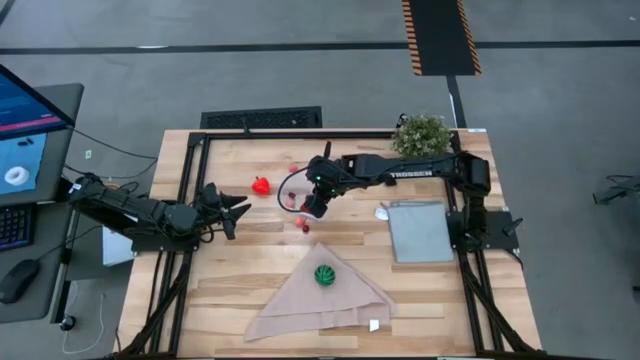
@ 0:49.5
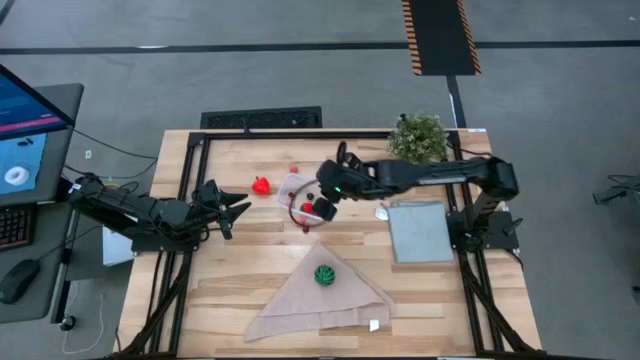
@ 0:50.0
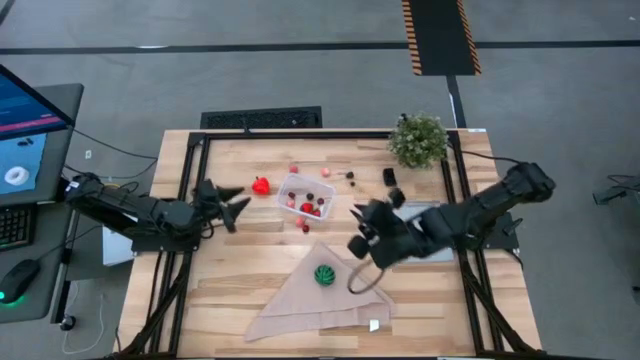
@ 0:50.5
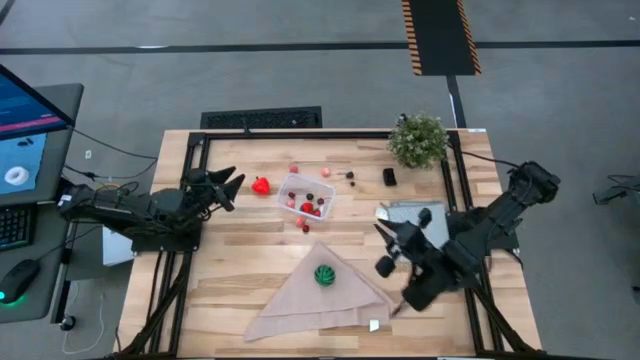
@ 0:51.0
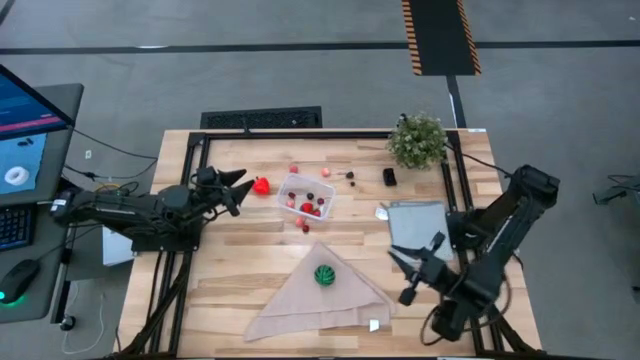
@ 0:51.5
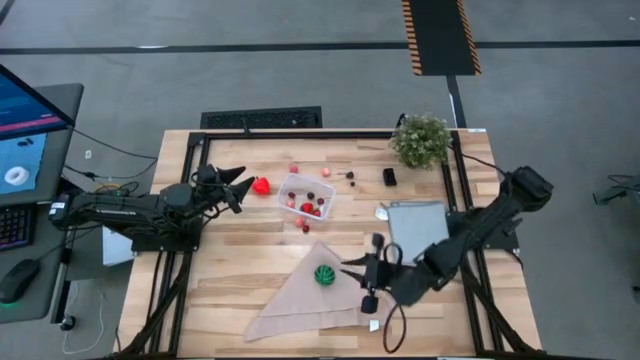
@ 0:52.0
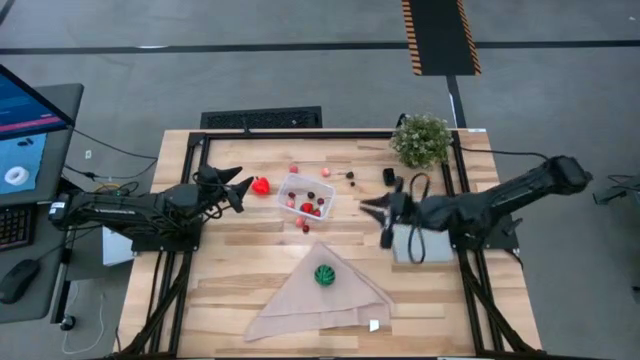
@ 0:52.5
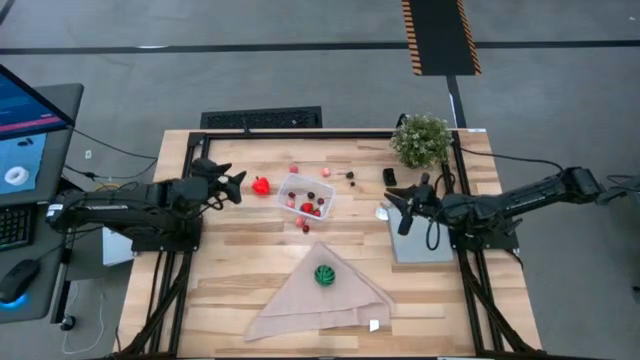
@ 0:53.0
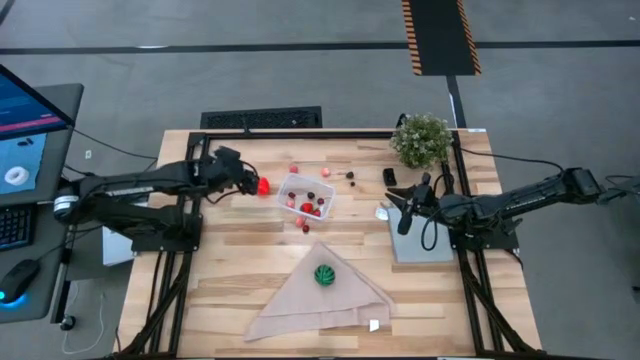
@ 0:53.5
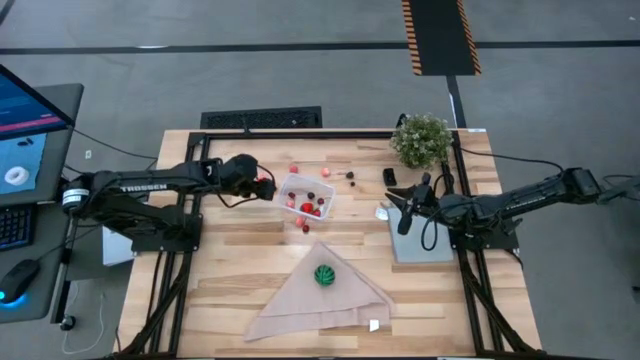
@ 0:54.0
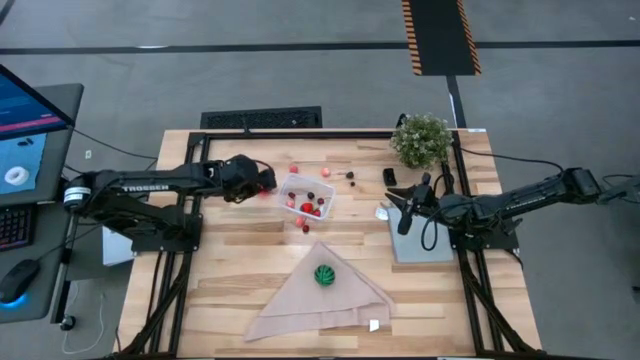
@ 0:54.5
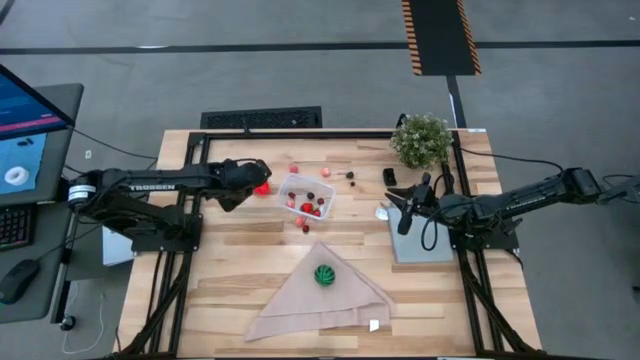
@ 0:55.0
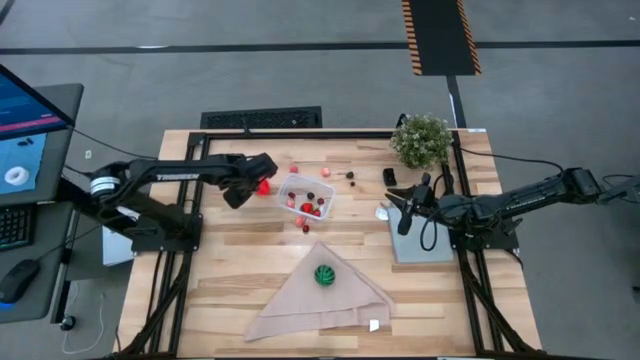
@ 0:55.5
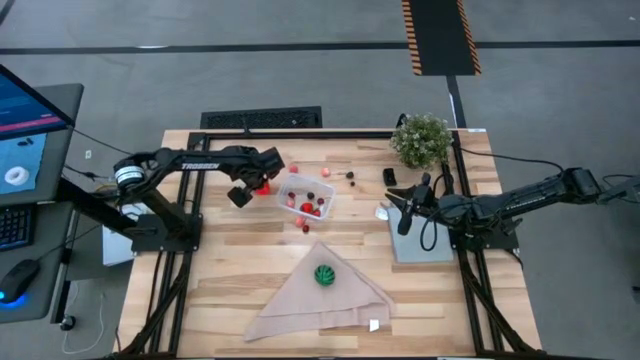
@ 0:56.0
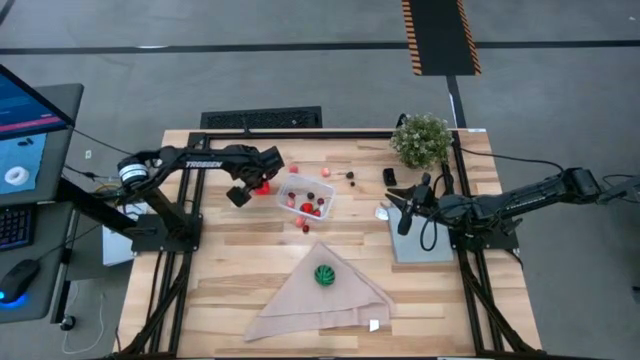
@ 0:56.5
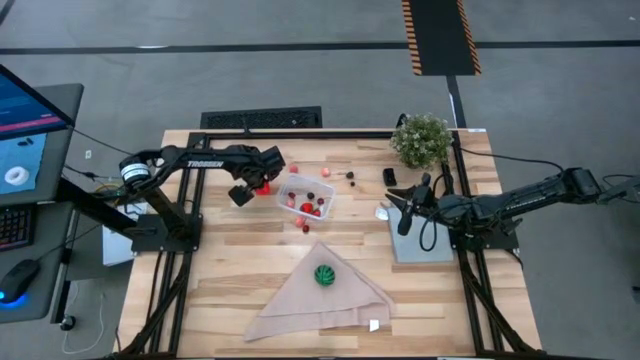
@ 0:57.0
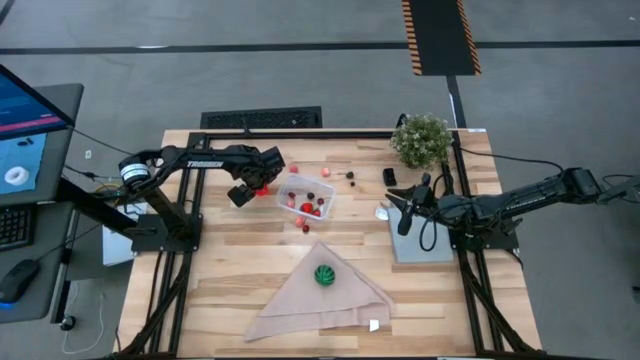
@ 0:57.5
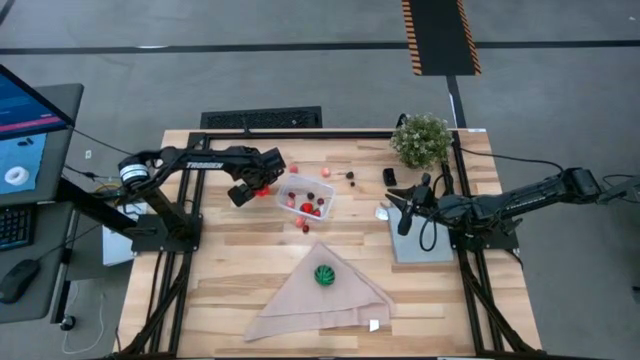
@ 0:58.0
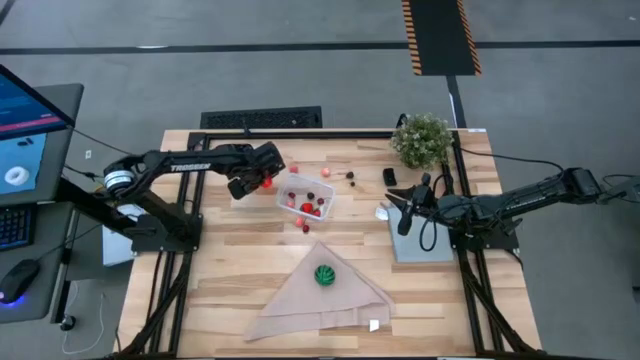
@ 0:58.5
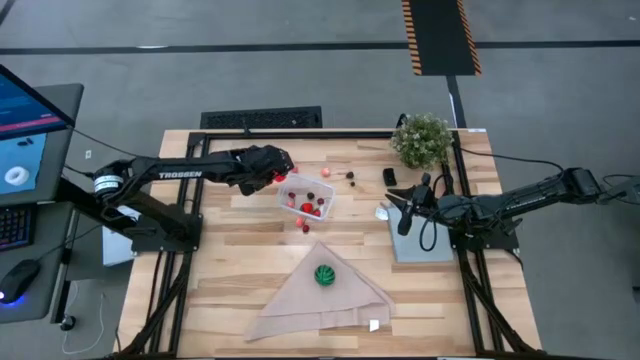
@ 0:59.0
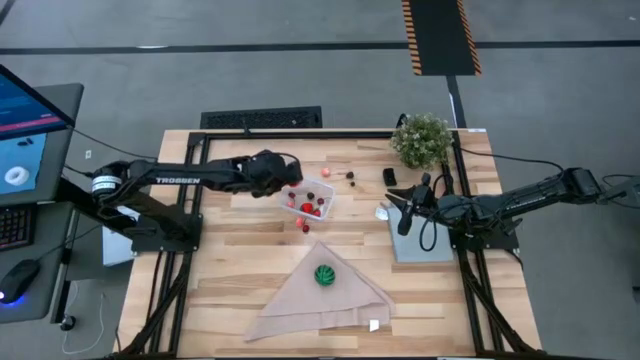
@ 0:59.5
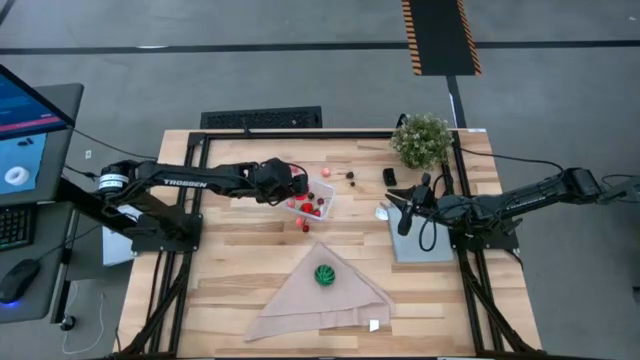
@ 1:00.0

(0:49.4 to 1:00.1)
Task: Pick and placing Produce into tupperware
Put the red apple into the transparent bin

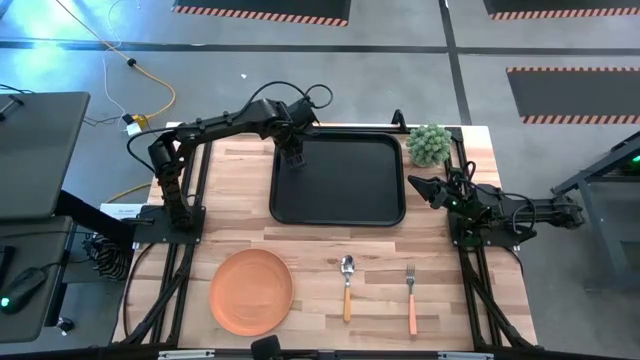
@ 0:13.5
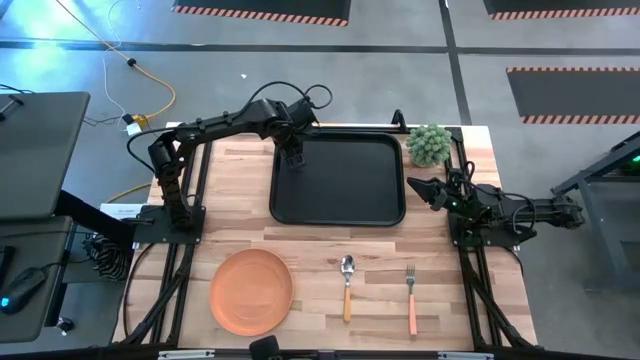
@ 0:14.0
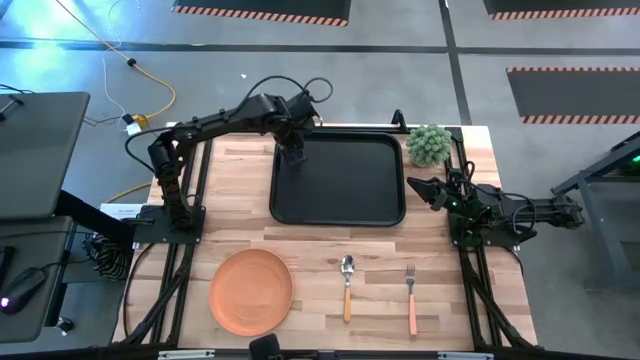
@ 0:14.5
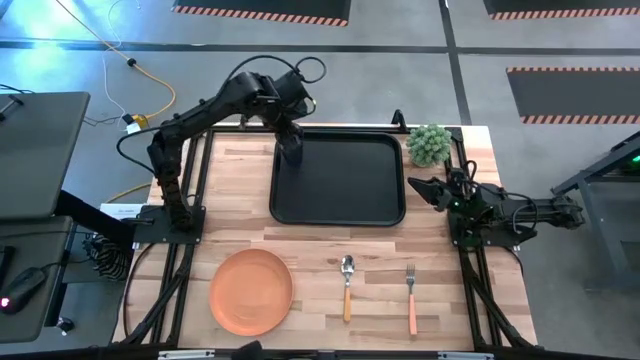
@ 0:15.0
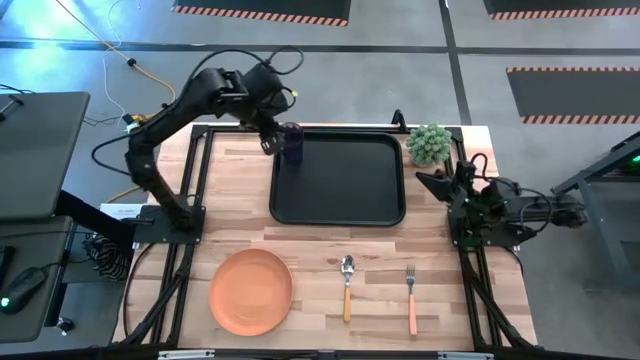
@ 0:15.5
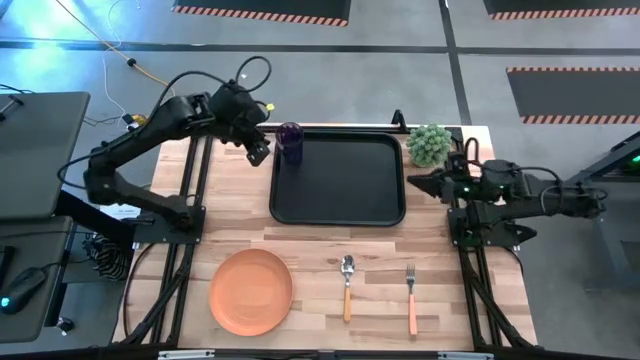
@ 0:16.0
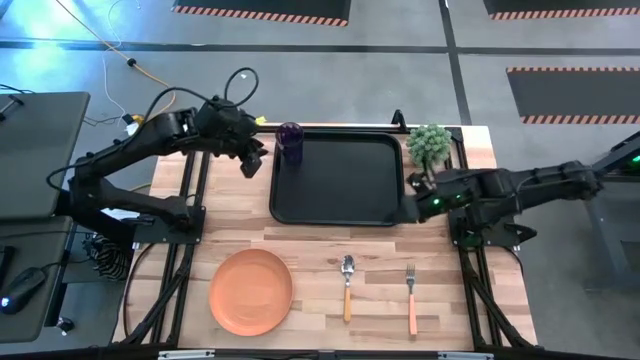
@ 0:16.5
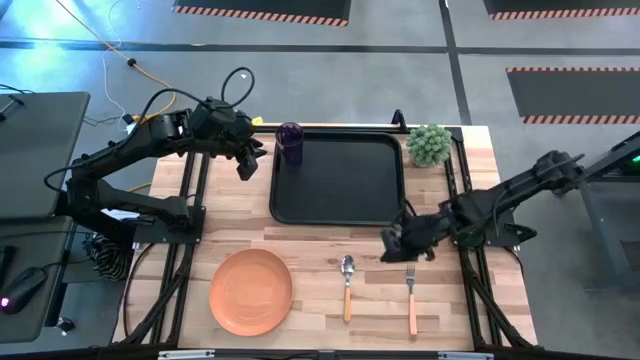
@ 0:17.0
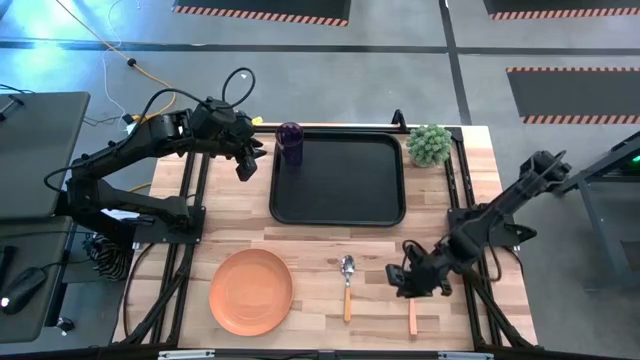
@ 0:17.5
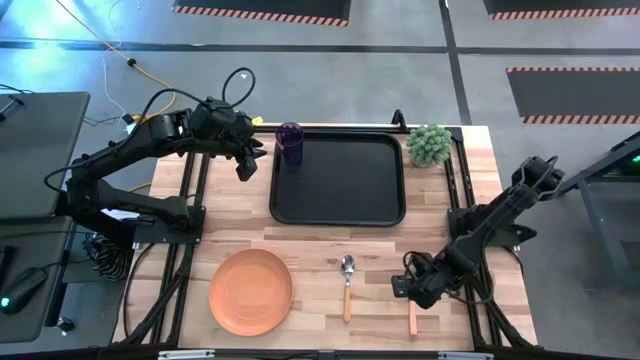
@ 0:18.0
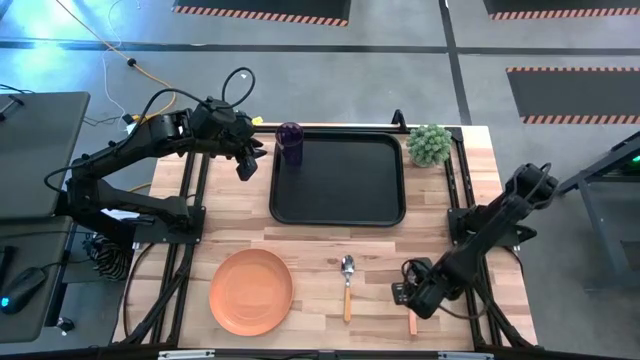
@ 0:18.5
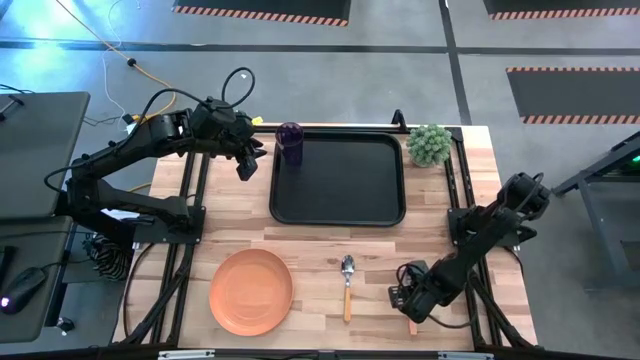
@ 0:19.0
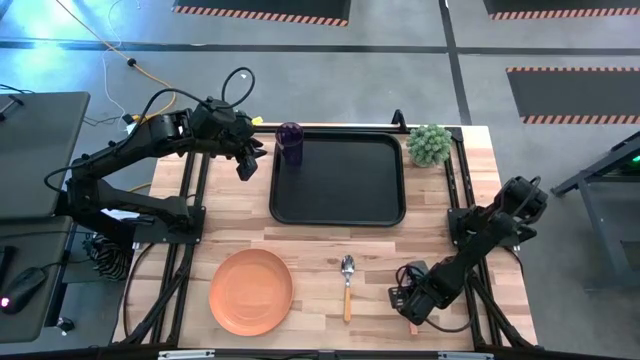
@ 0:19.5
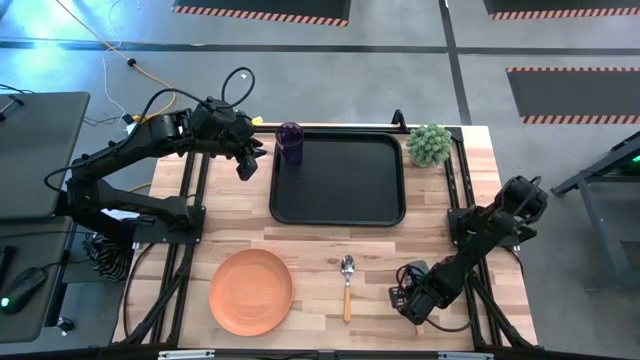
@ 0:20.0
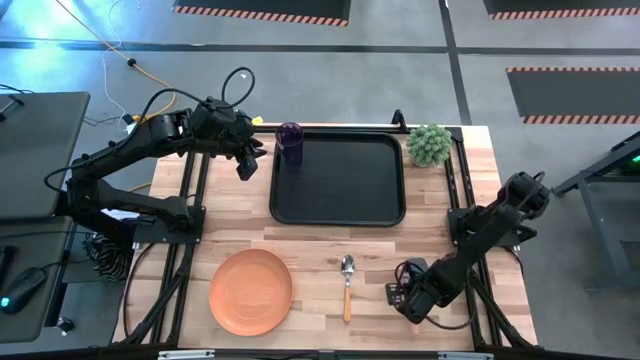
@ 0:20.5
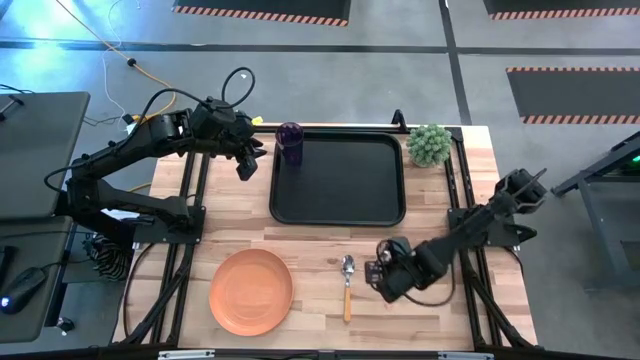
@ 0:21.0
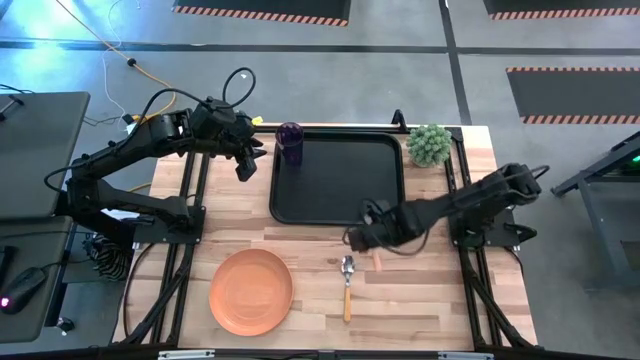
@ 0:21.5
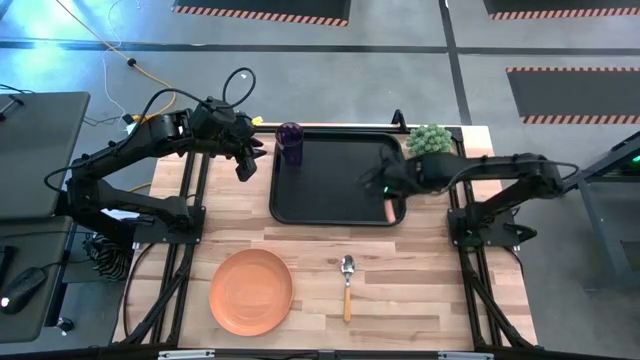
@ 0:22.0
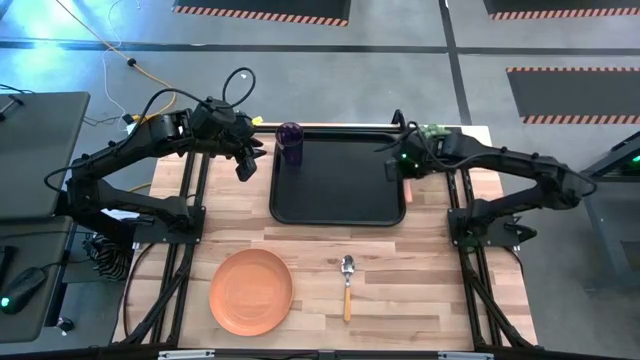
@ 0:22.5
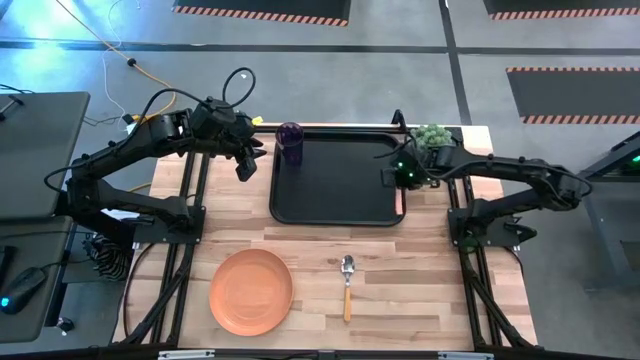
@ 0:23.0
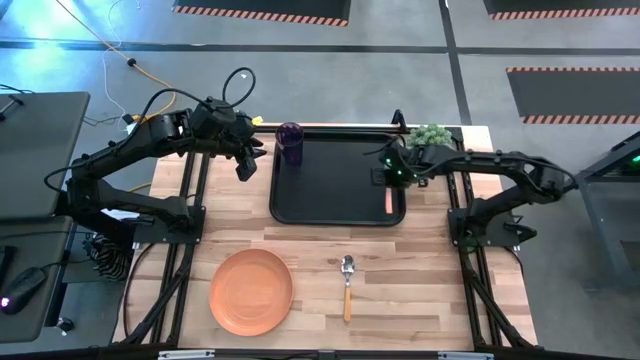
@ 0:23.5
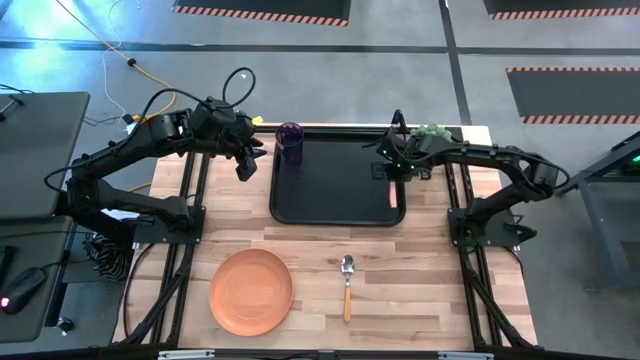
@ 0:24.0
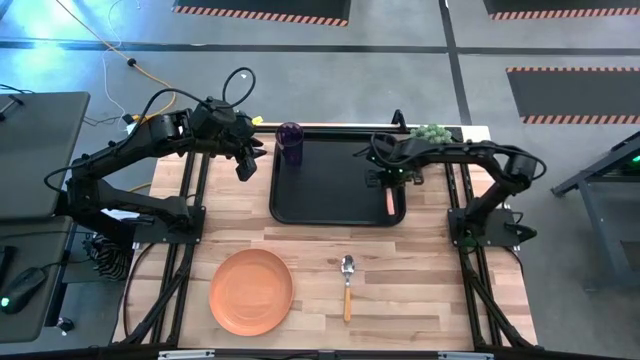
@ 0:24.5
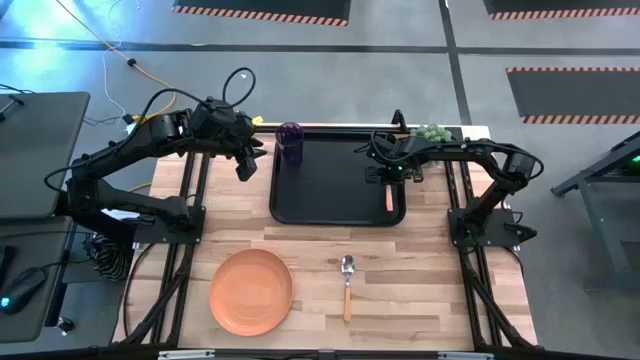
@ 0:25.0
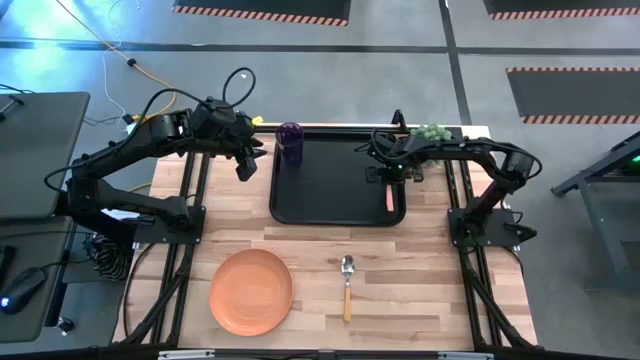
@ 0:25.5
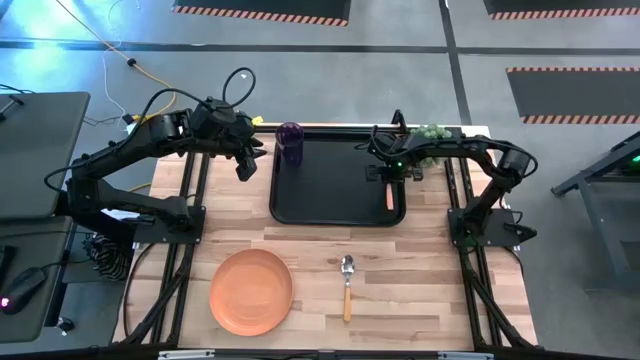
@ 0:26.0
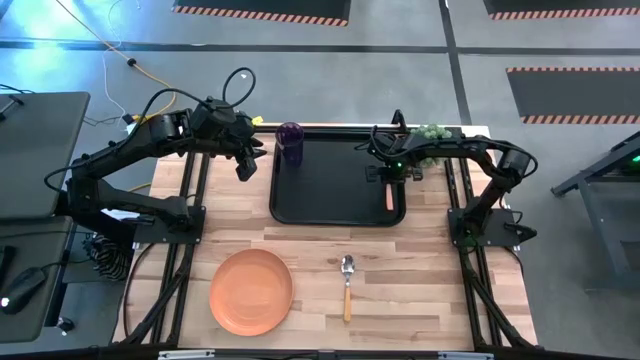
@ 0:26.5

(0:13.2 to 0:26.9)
Task: Pick and place plate/cup/fork/spoon on tray
Put the orange fork to the right of the violet cup on the black tray
